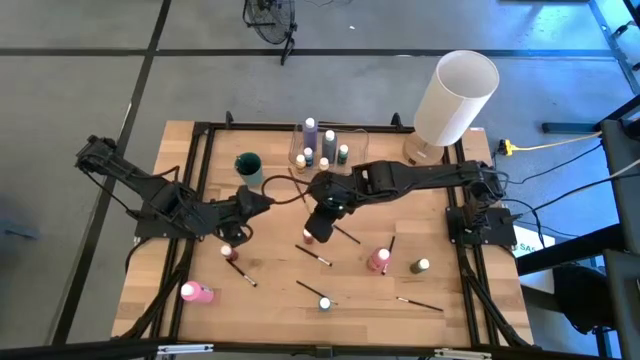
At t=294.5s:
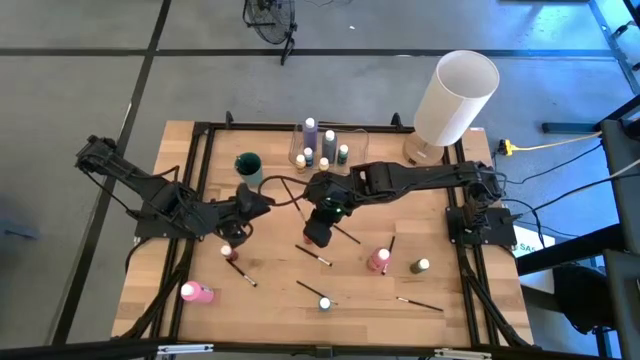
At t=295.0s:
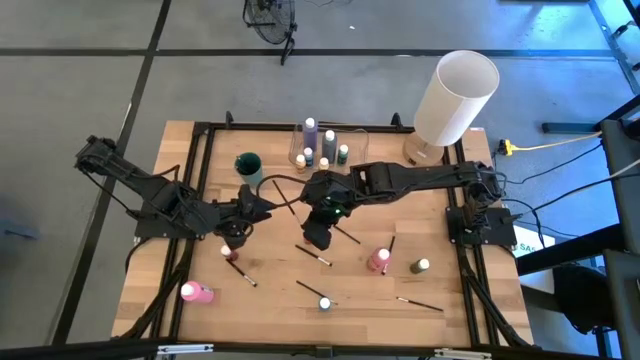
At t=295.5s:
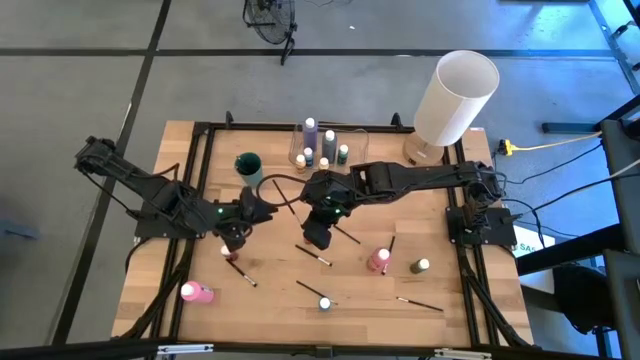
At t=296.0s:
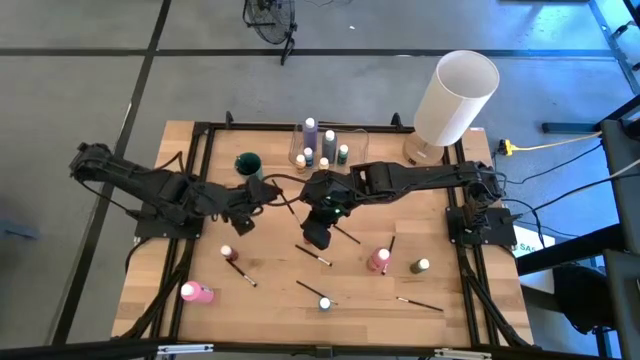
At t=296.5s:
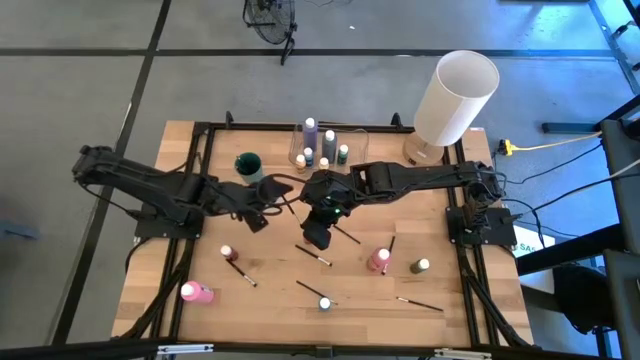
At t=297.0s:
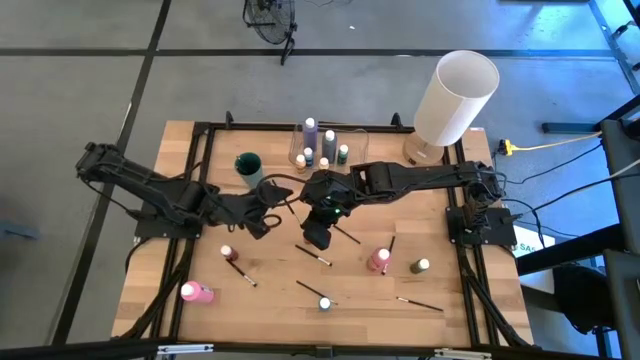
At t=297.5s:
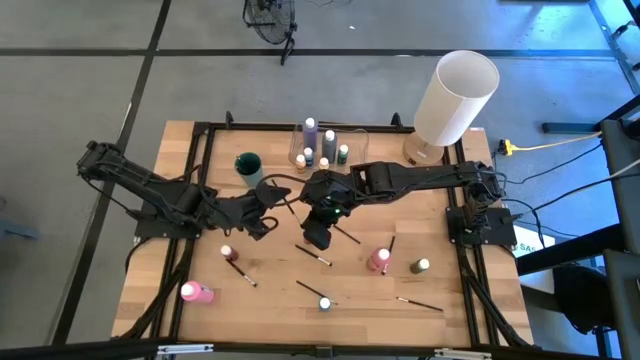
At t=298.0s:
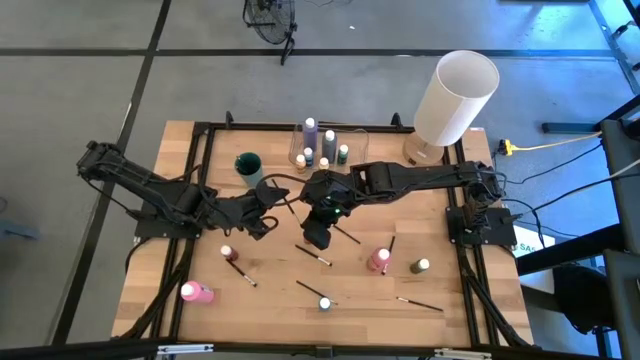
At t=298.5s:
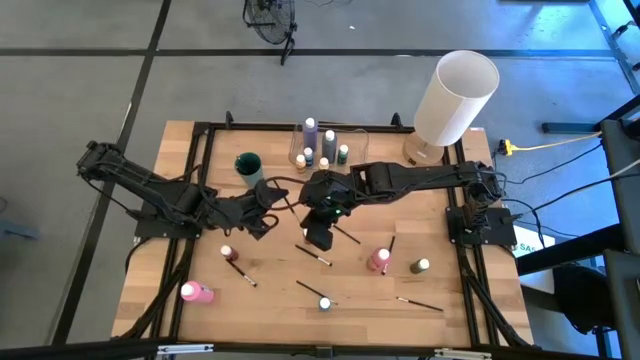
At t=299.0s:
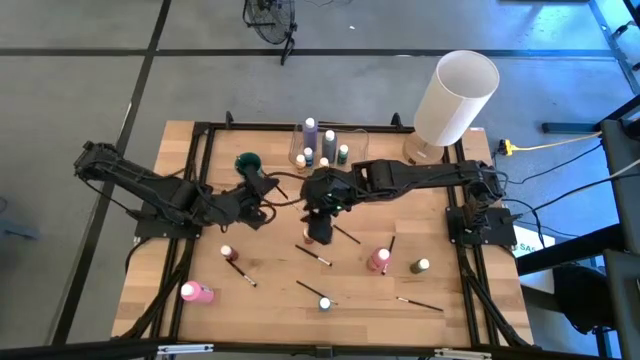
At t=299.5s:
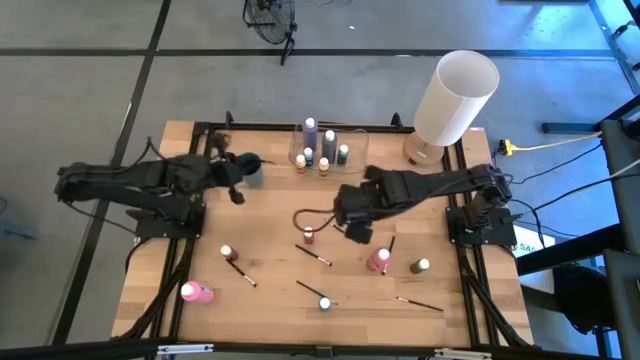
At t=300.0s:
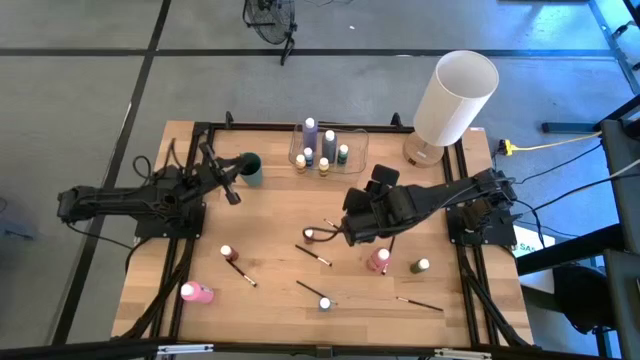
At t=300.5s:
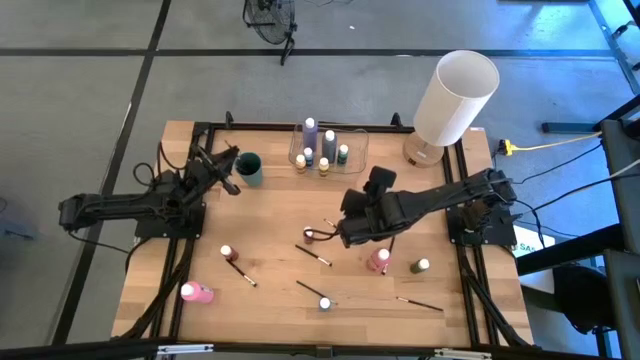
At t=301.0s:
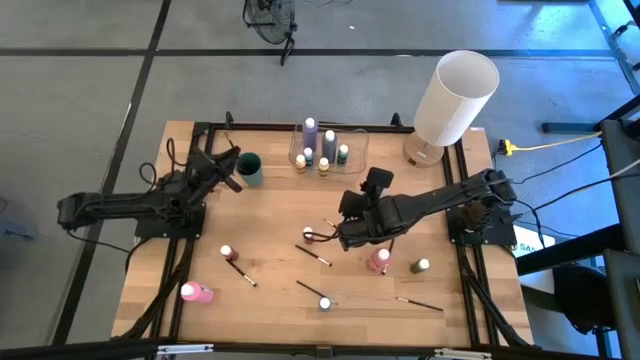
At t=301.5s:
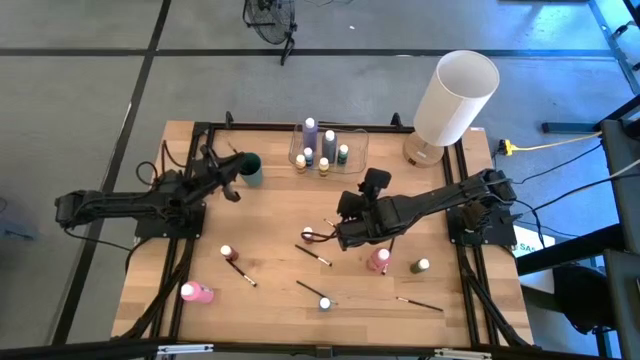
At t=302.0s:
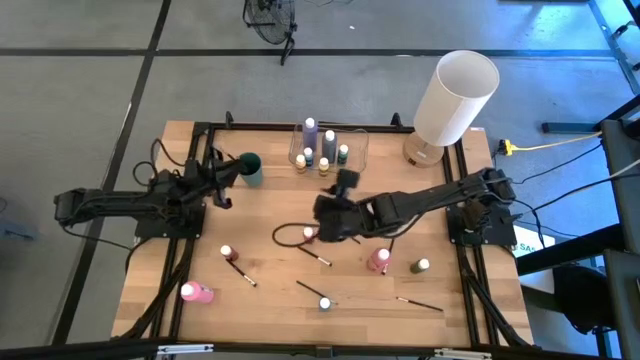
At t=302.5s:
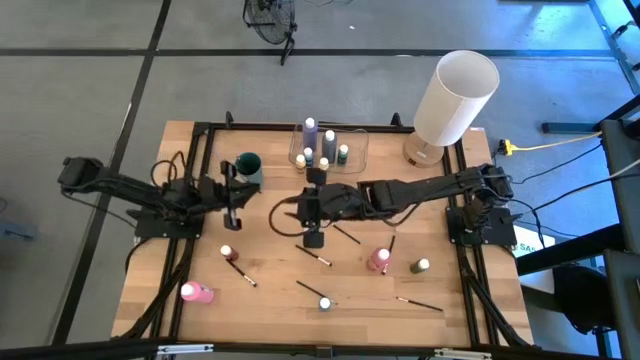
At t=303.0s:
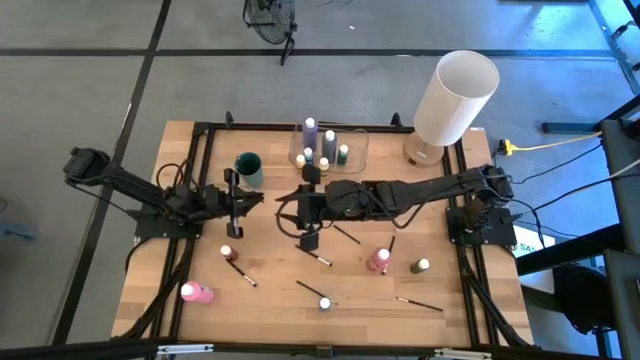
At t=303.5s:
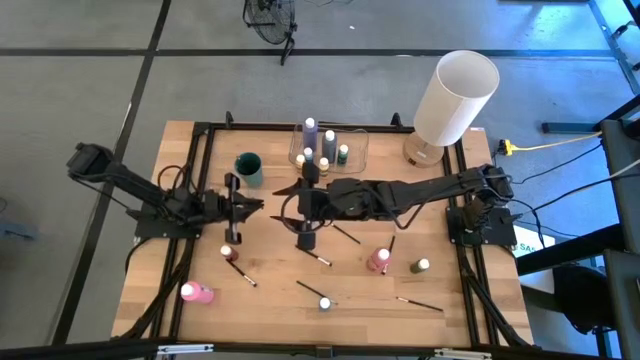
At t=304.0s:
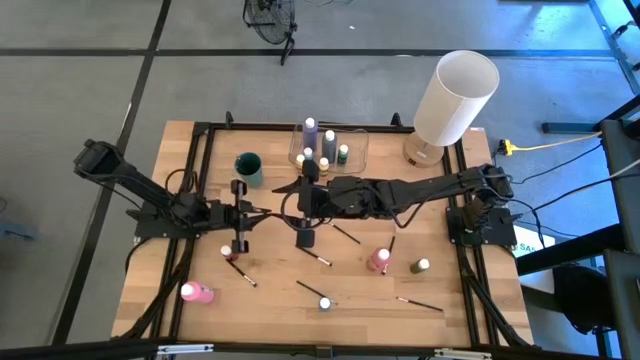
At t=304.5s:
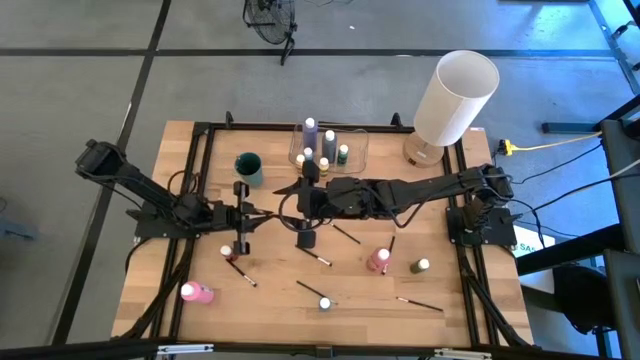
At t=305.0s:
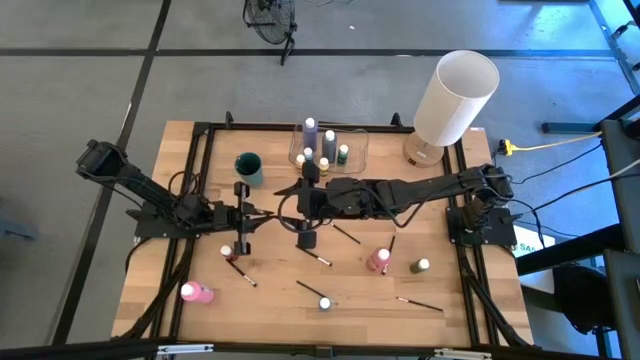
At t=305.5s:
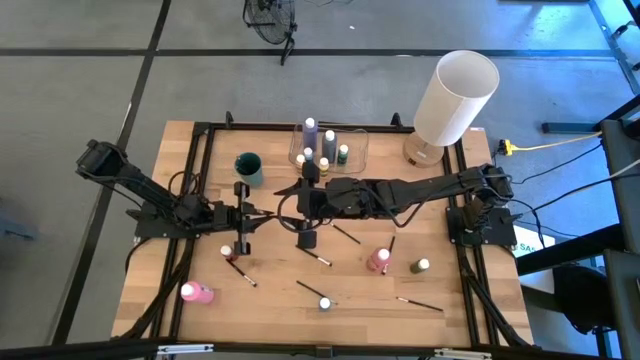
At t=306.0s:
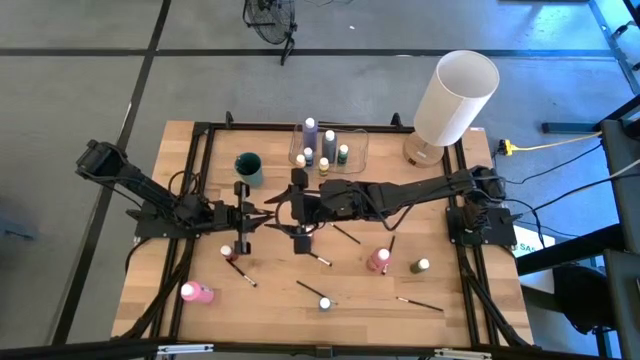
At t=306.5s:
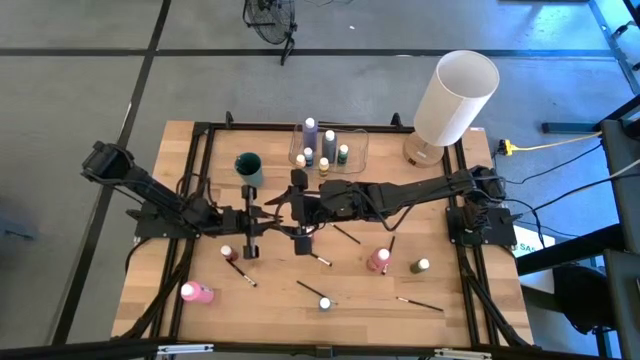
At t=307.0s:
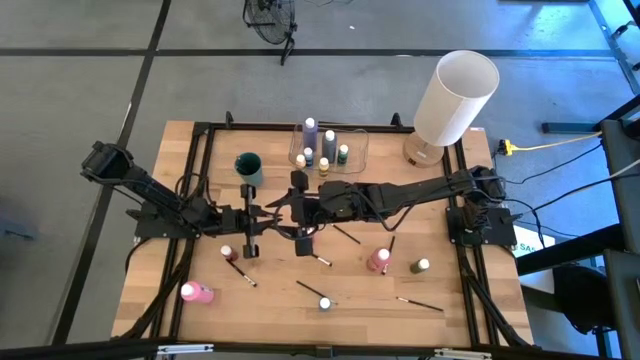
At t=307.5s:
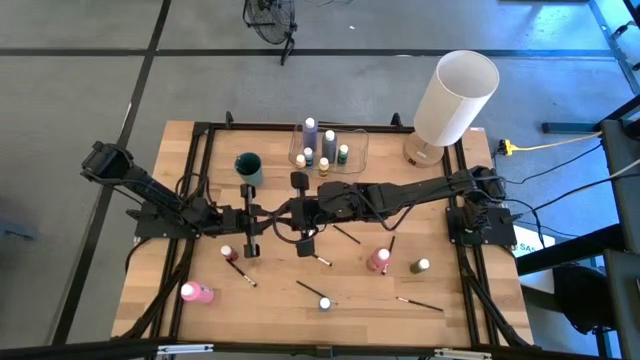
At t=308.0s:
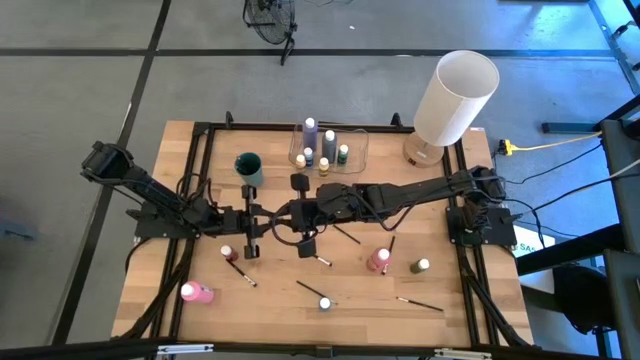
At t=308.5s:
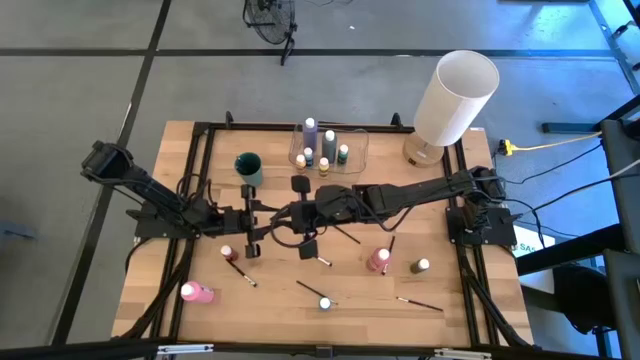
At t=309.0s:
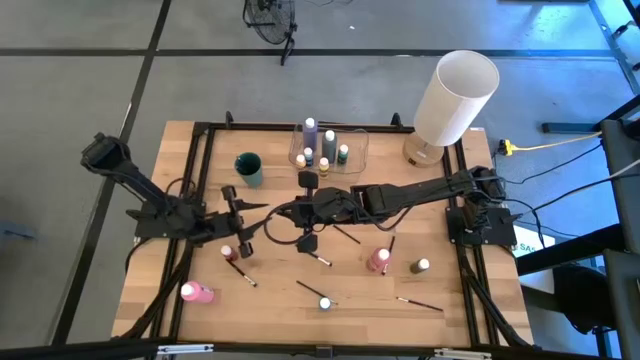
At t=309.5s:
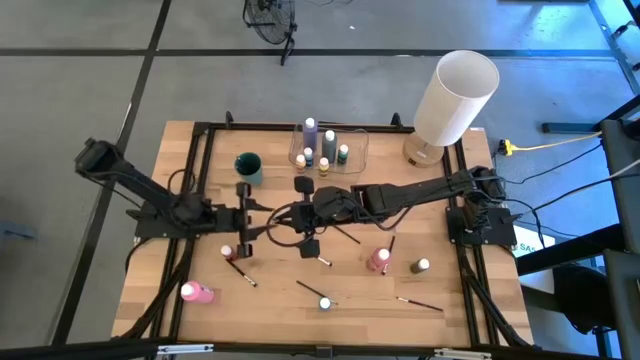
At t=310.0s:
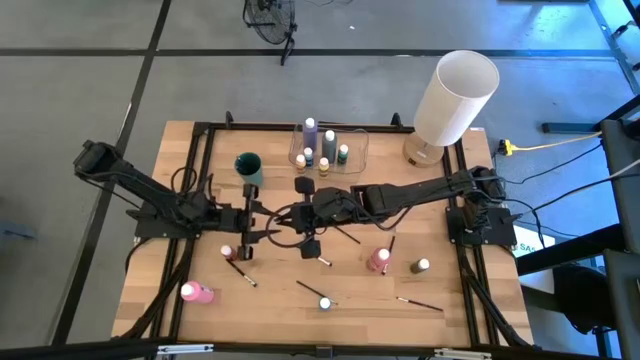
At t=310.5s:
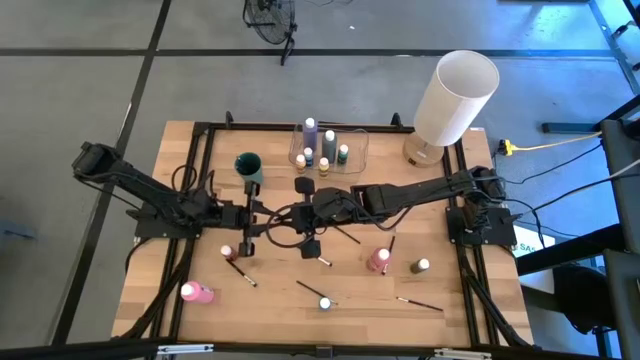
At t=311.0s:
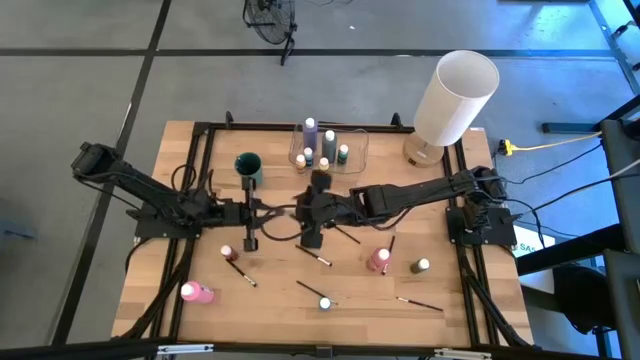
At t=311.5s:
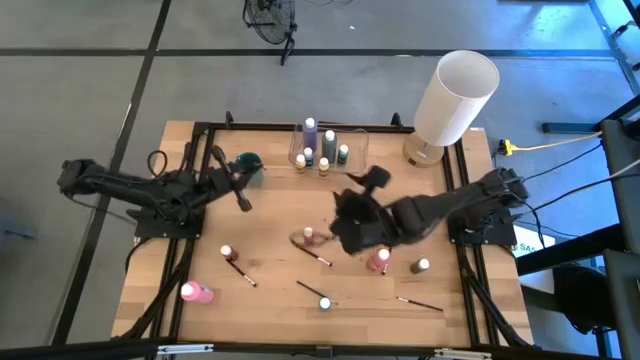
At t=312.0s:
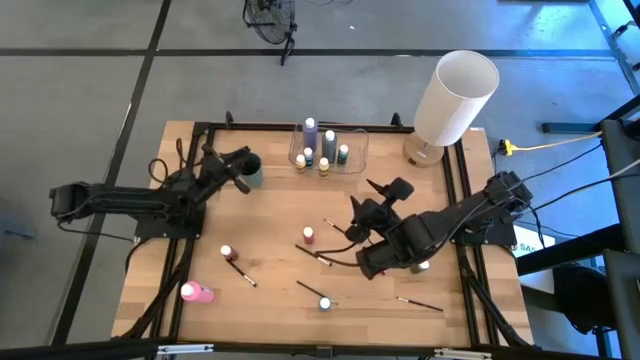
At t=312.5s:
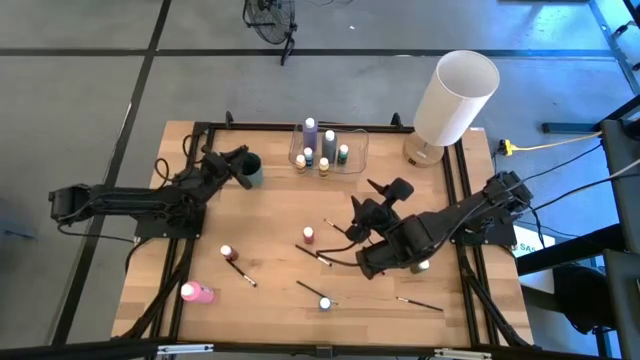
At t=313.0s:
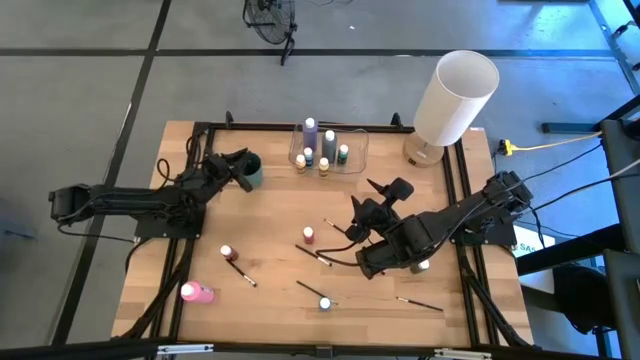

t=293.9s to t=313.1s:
Task: Pick & Place Paint Supplies
Put the silver paint brush into the green cup

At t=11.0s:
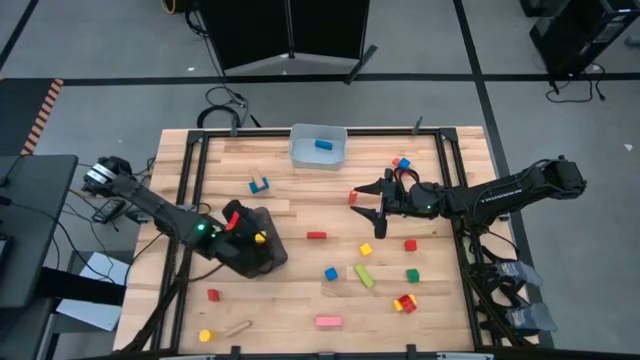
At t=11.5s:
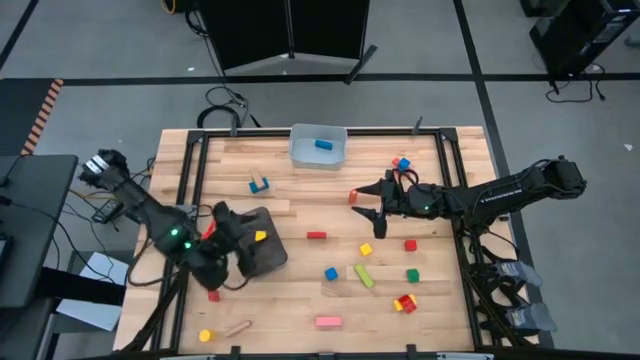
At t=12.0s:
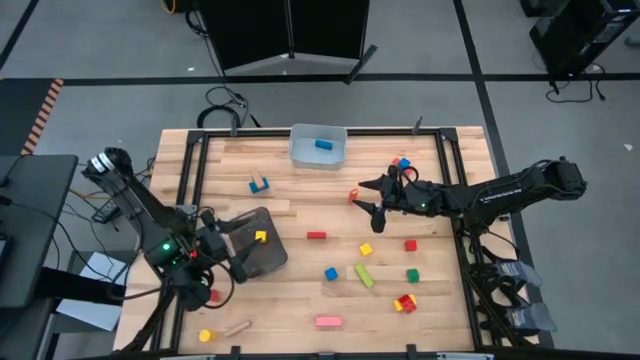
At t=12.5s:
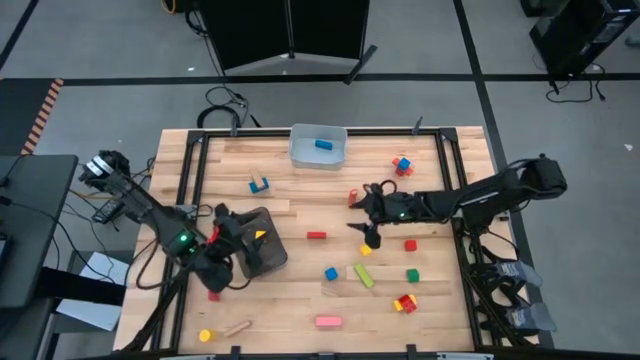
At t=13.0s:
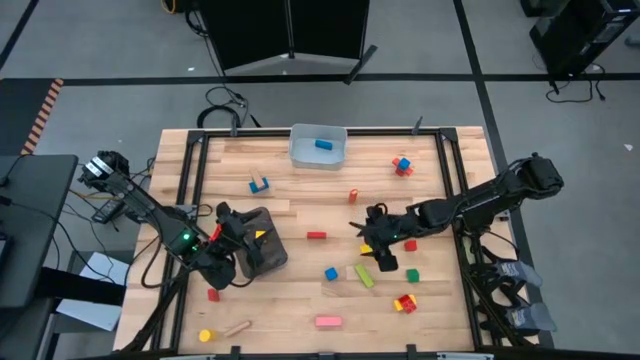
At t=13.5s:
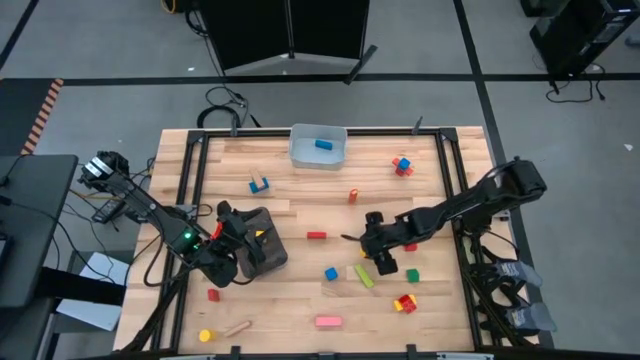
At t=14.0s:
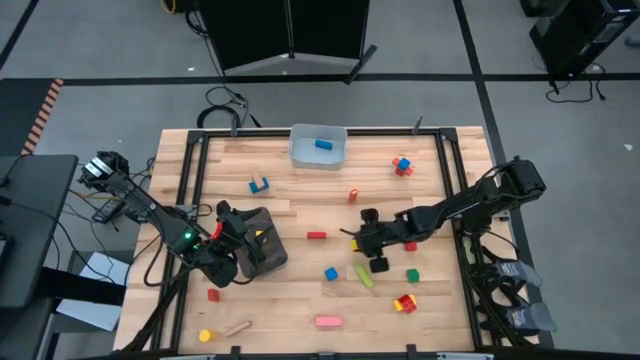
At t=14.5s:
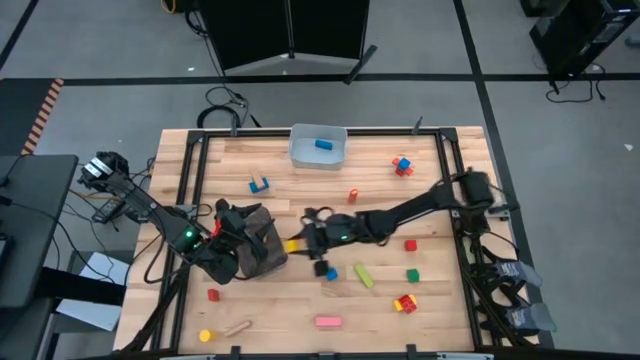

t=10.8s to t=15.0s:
Task: Sort blocks by size
Put the yellow square block into the black bin
